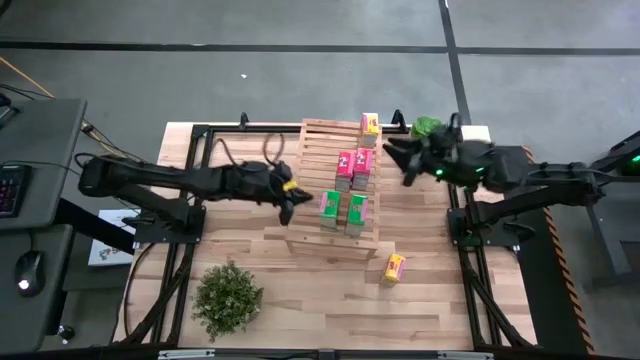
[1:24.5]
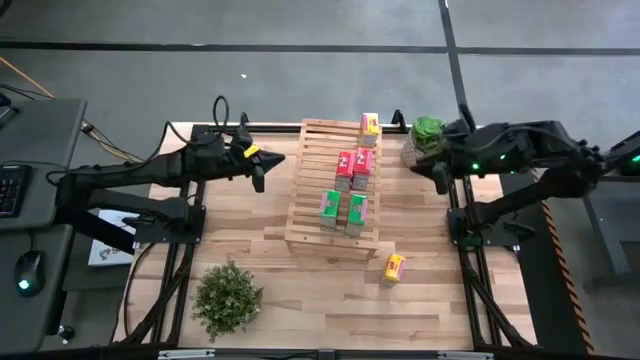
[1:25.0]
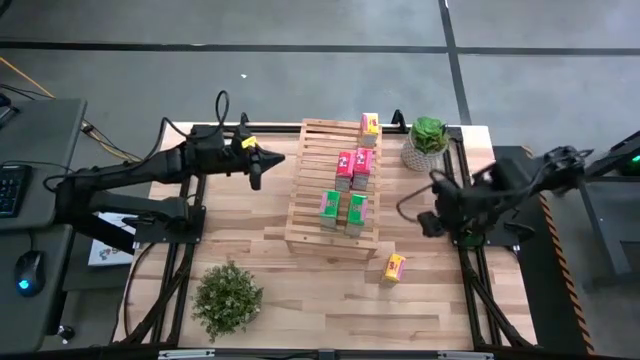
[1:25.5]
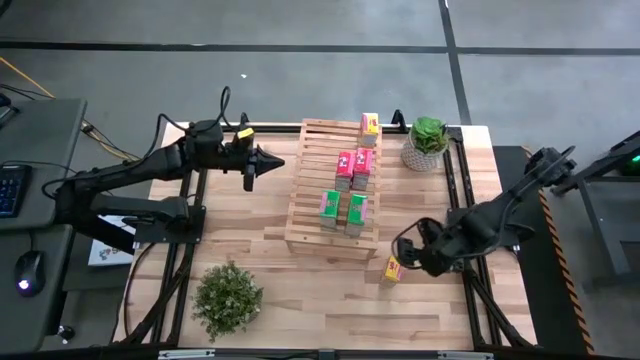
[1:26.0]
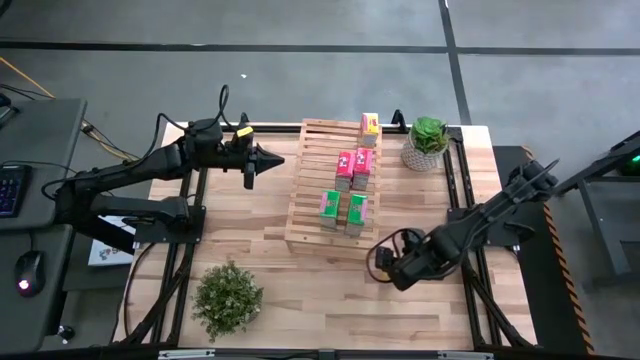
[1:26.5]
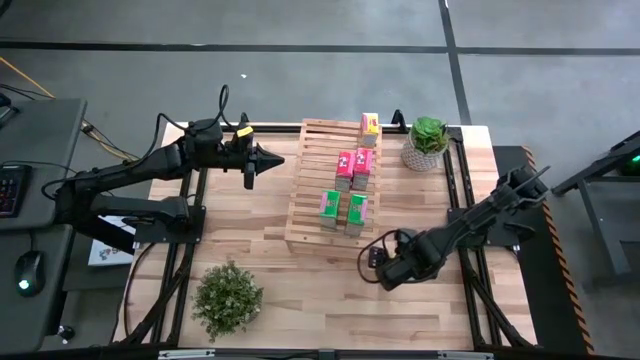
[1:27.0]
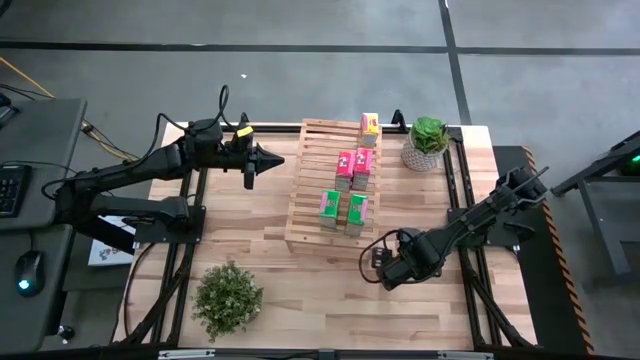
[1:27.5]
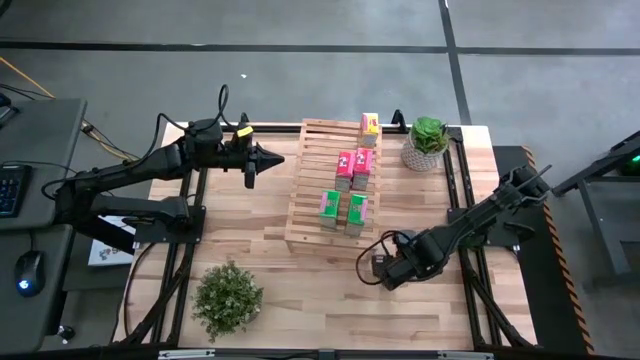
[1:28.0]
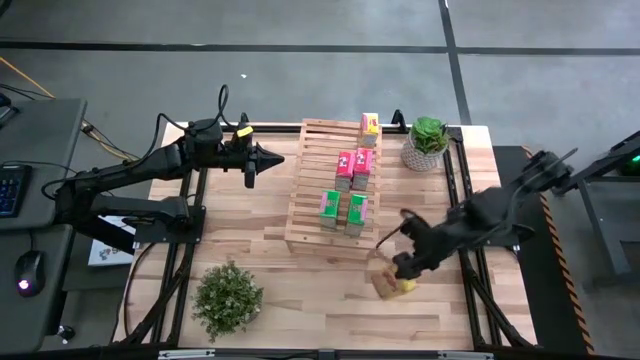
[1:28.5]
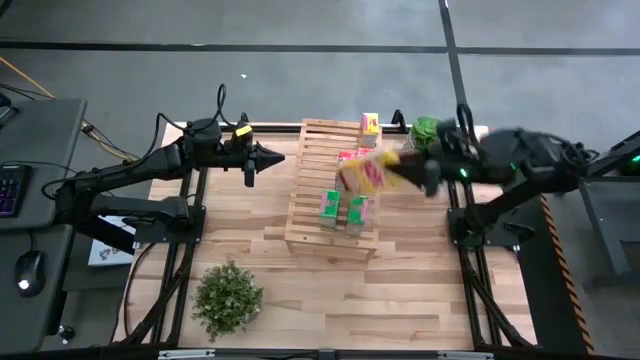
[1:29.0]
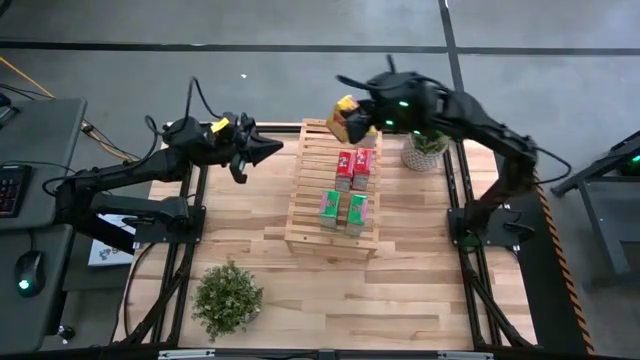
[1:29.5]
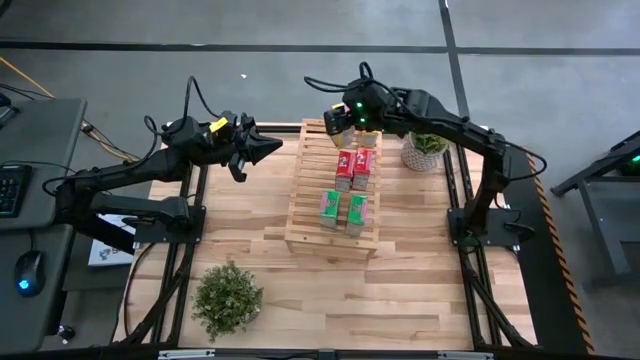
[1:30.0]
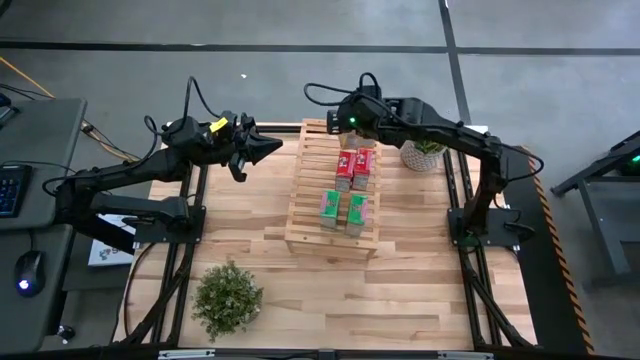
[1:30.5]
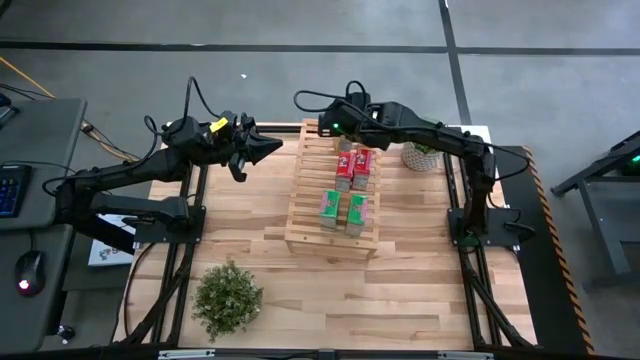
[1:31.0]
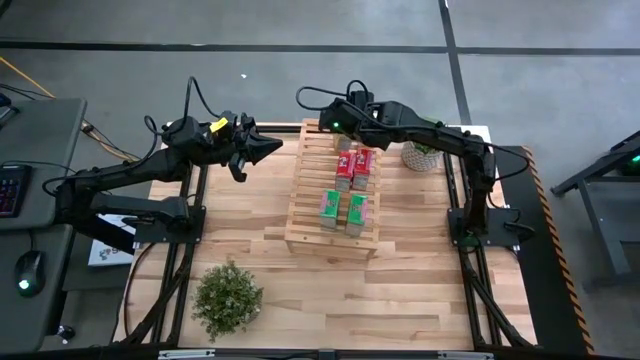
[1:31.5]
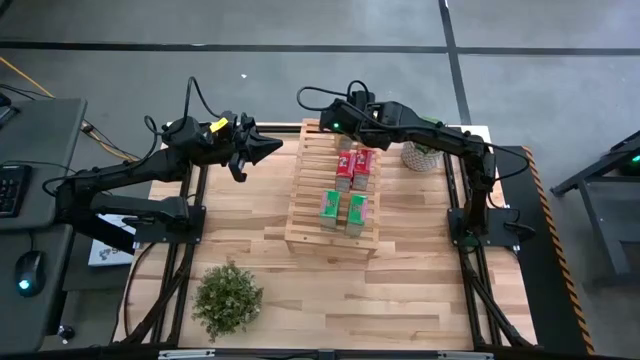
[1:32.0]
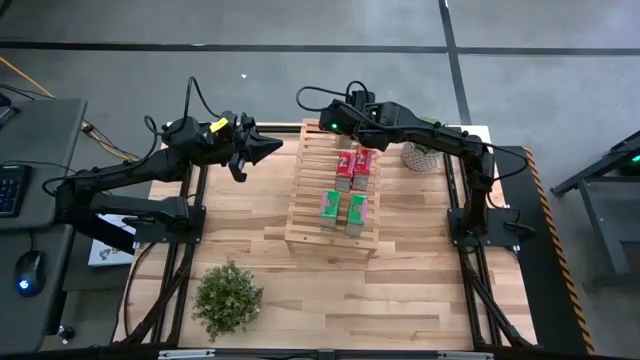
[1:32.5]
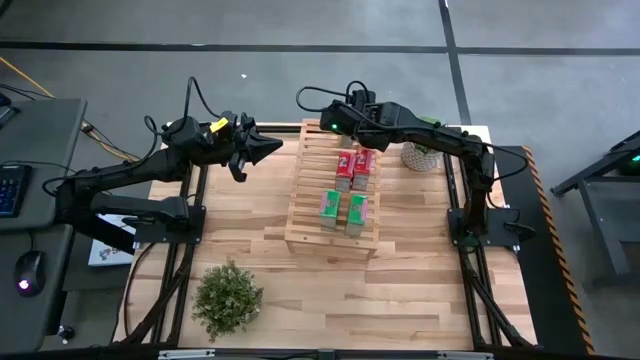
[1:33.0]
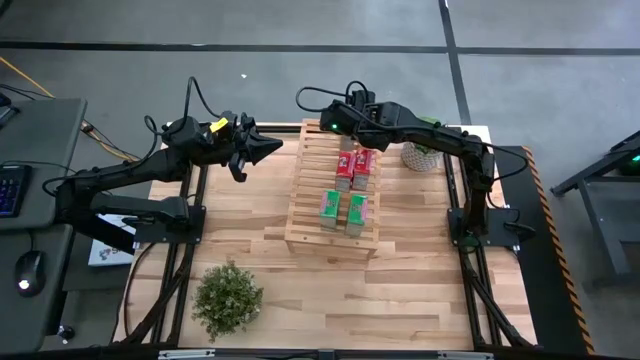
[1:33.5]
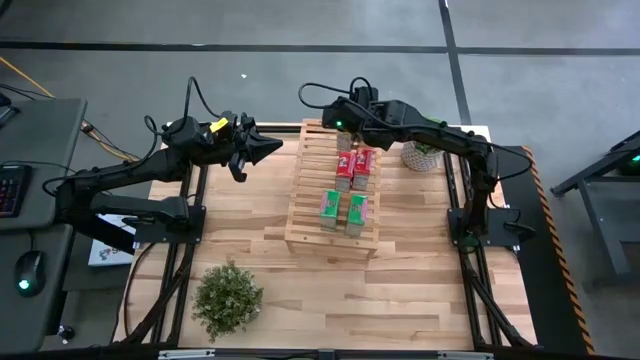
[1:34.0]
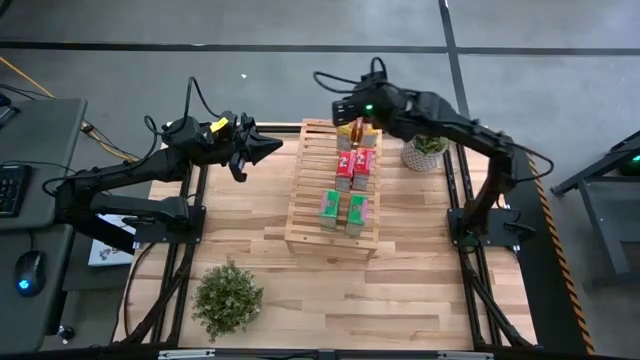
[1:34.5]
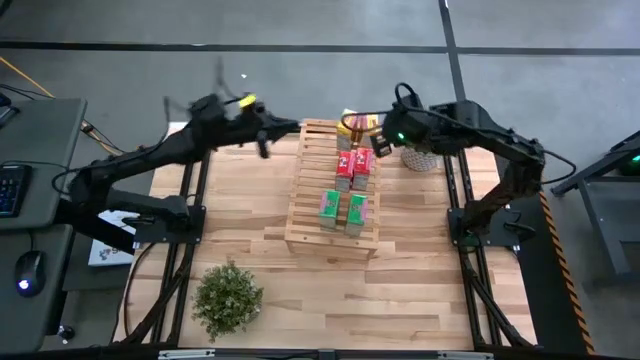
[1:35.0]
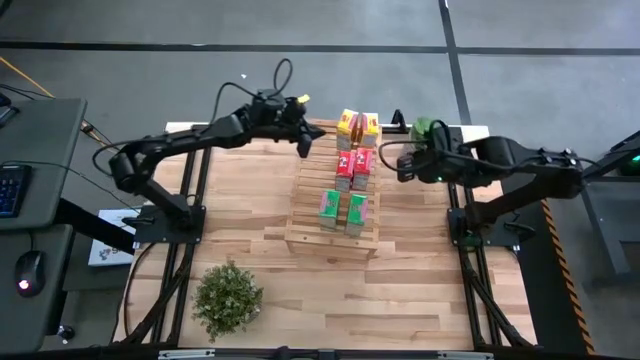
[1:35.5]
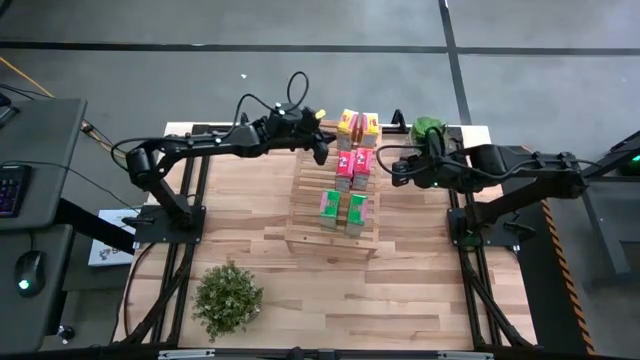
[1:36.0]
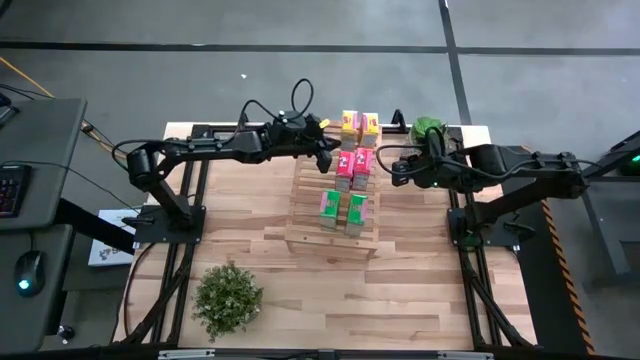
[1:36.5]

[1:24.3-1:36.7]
Task: Stack cereal on shelf
Put the yellow cereal box on the shelf aligned with other yellow cereal box

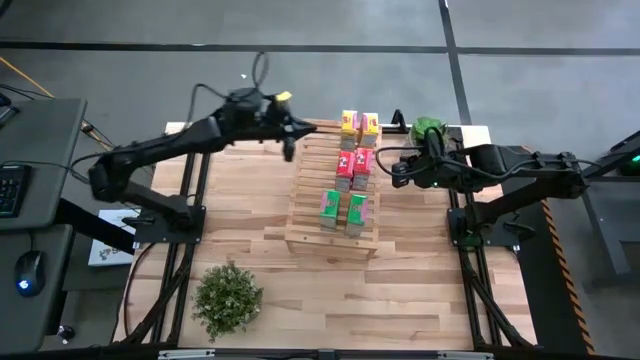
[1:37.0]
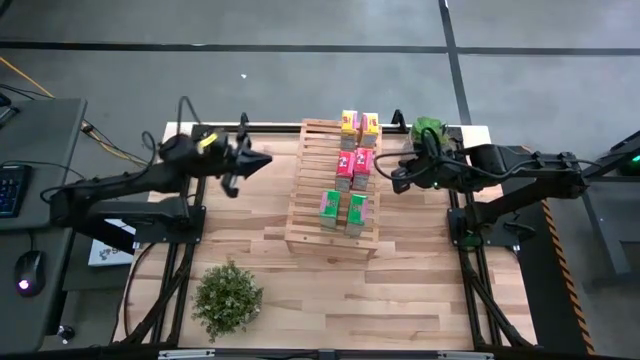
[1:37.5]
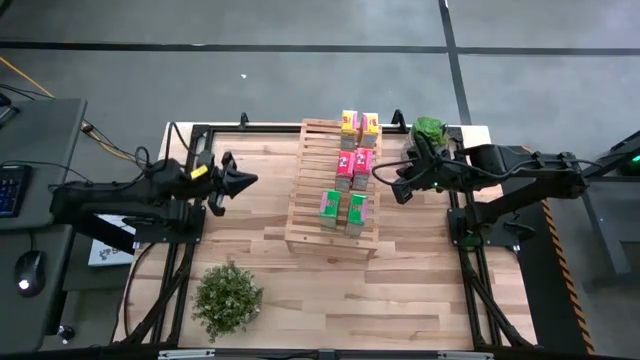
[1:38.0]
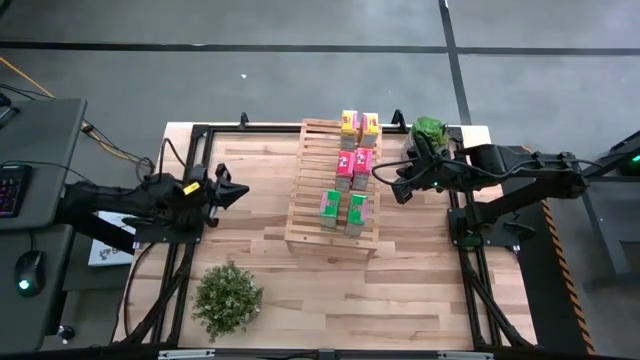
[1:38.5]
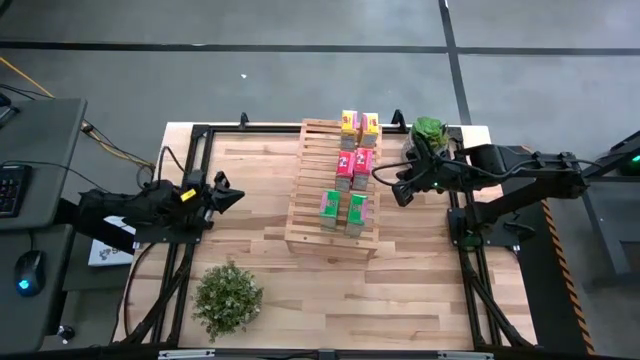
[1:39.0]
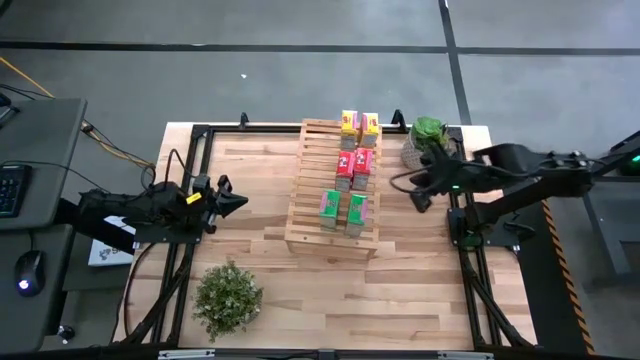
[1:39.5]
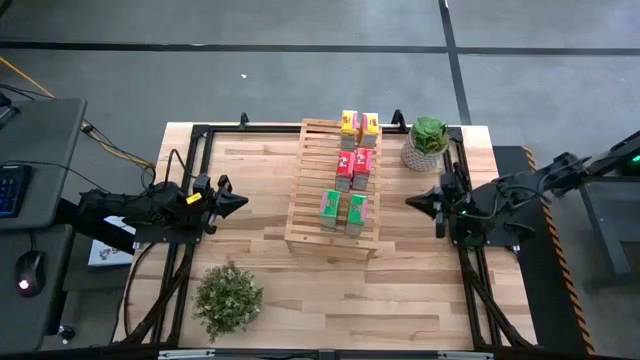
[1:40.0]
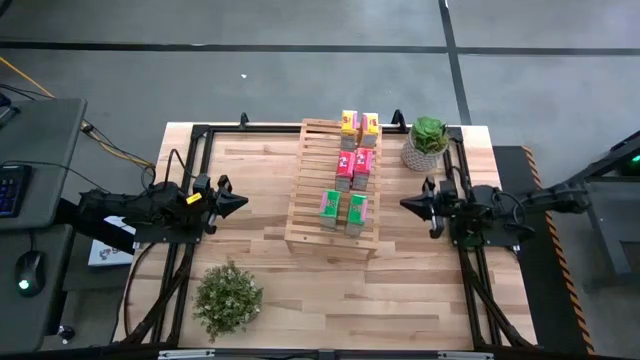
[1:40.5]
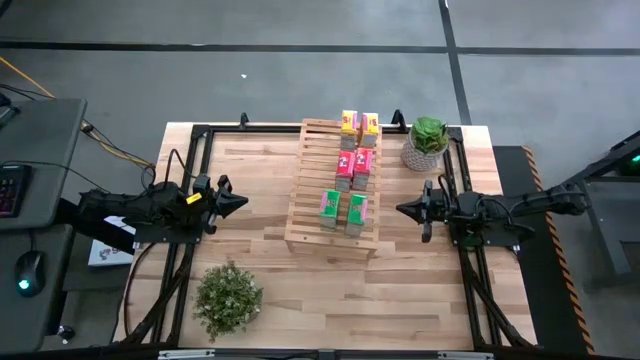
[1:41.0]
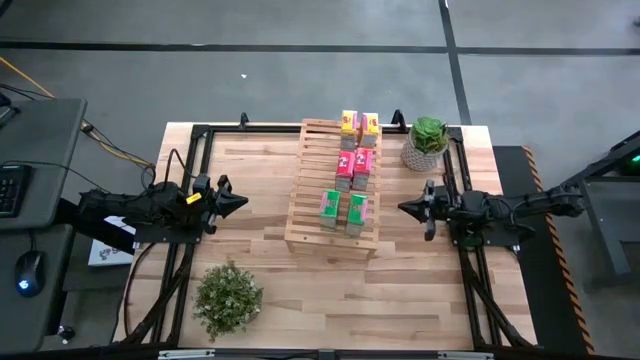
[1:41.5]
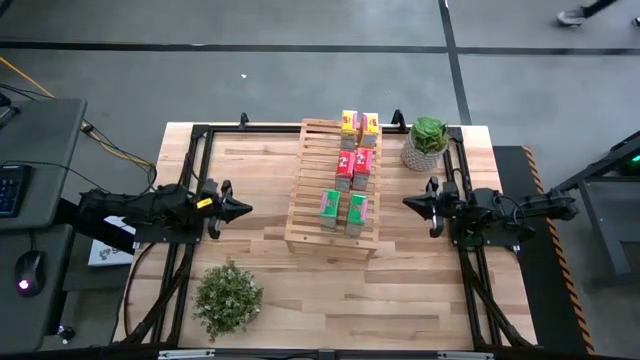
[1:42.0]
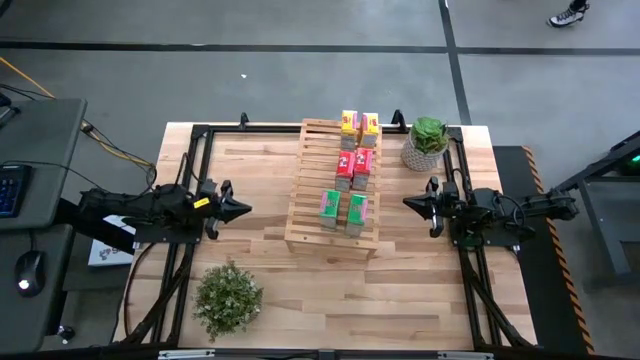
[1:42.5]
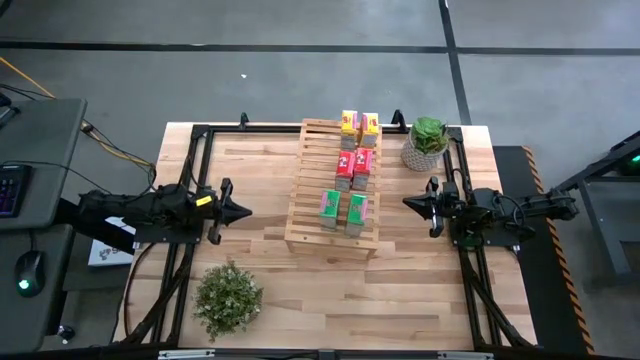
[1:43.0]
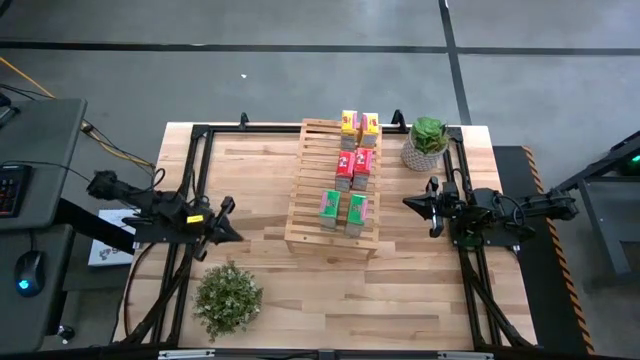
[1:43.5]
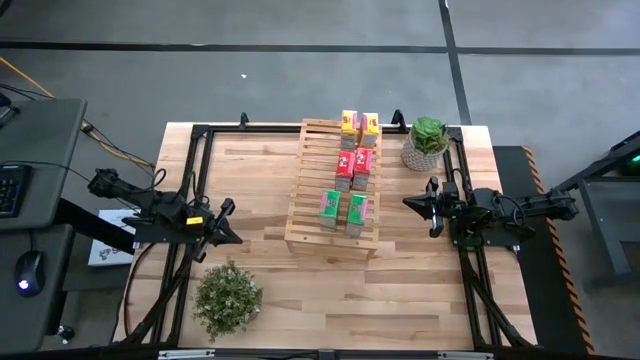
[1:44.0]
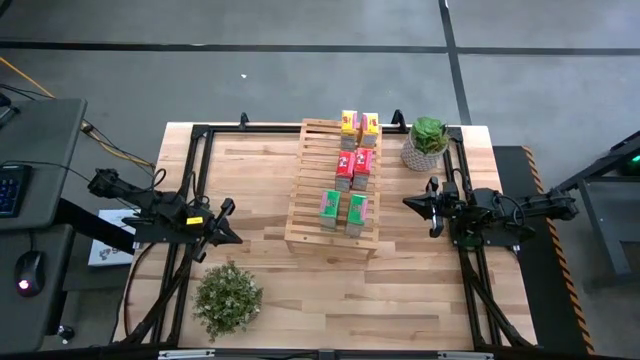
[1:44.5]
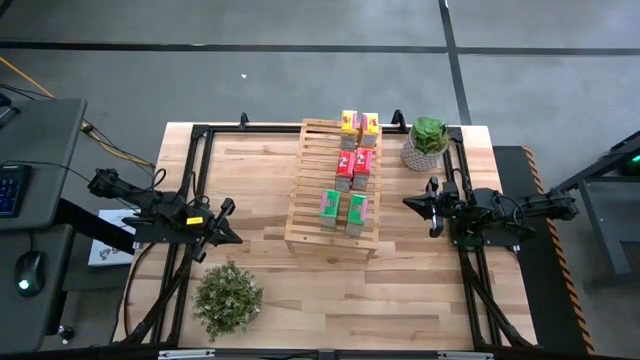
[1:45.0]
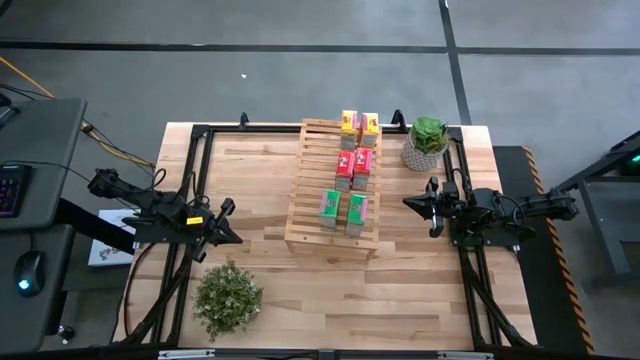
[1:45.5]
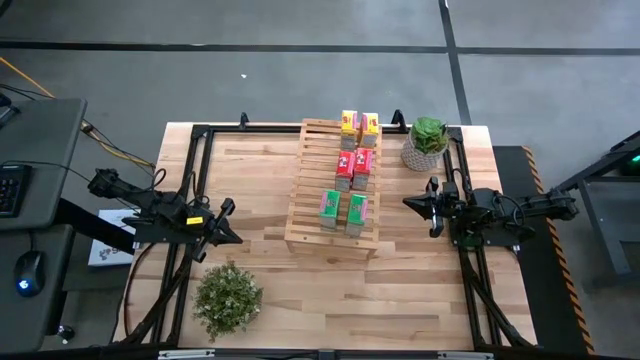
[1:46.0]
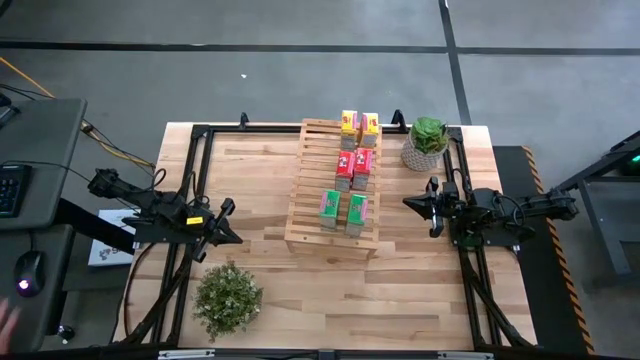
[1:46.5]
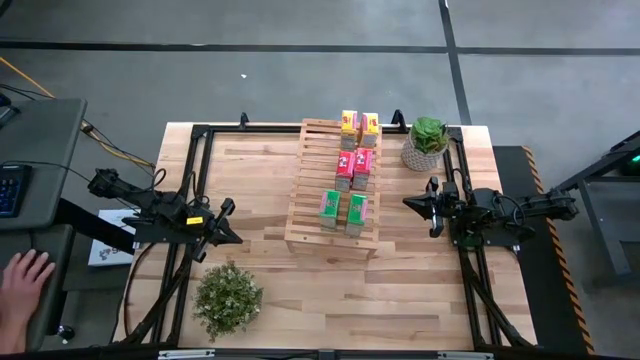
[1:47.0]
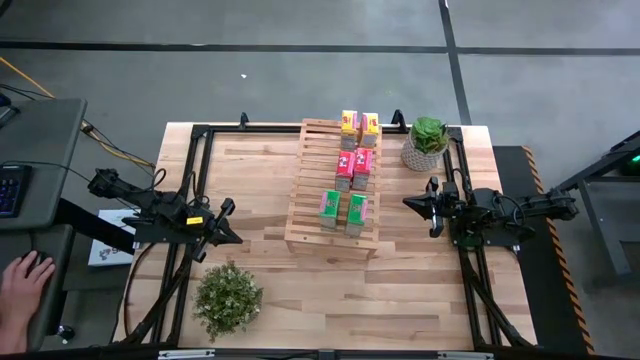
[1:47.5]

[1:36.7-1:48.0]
Return to Home Position
